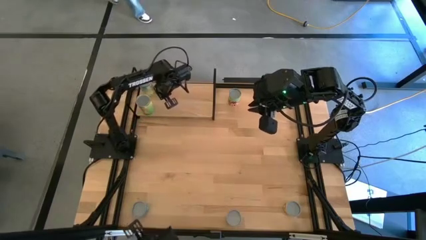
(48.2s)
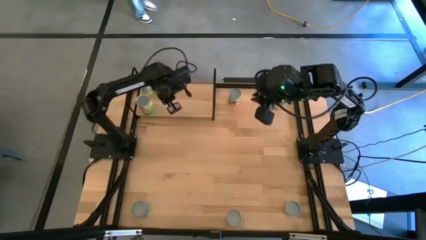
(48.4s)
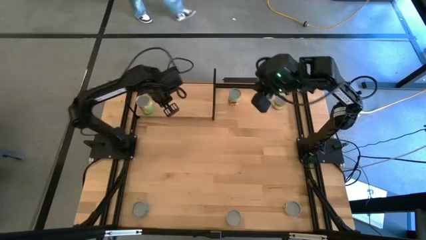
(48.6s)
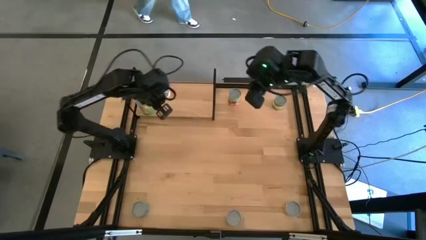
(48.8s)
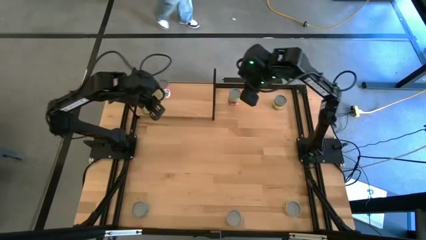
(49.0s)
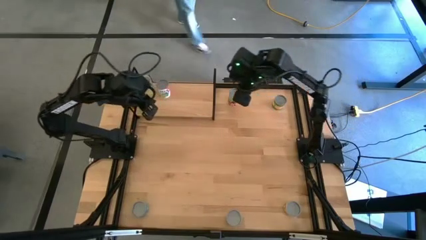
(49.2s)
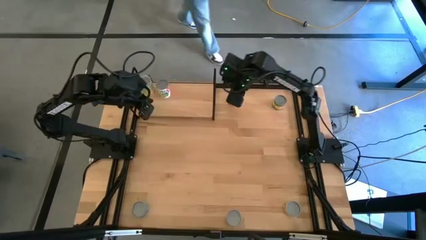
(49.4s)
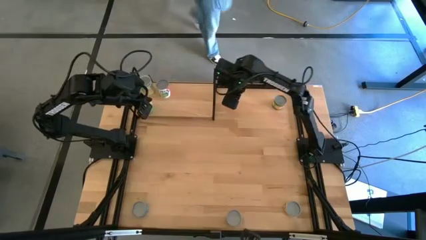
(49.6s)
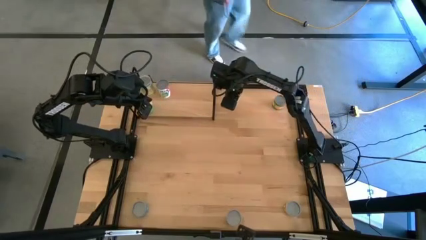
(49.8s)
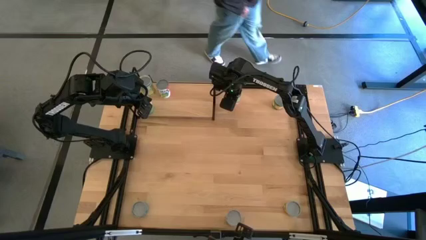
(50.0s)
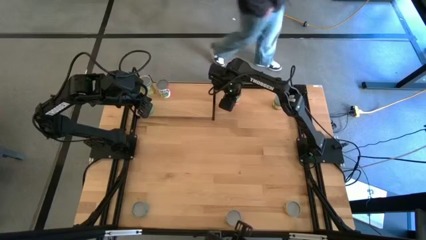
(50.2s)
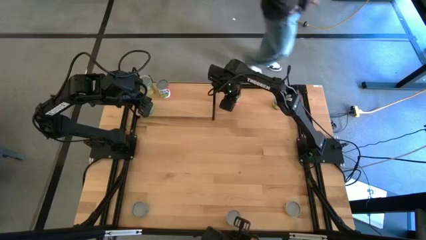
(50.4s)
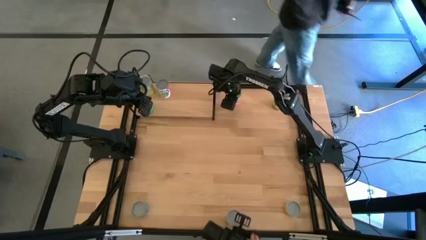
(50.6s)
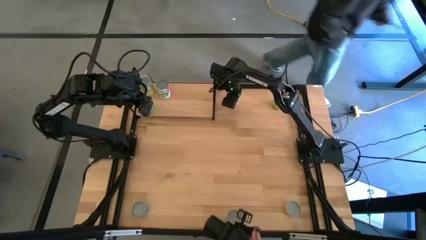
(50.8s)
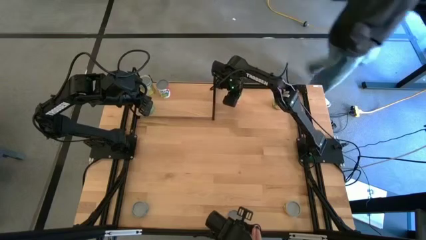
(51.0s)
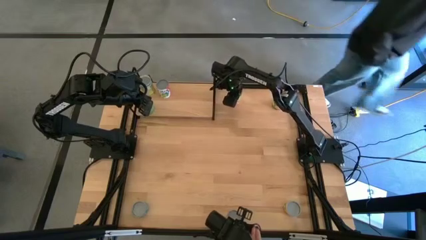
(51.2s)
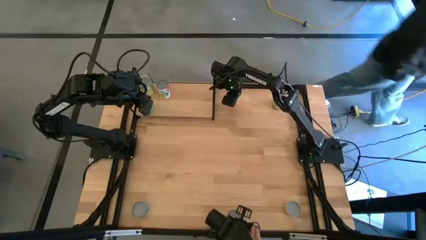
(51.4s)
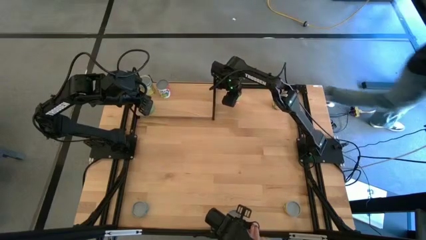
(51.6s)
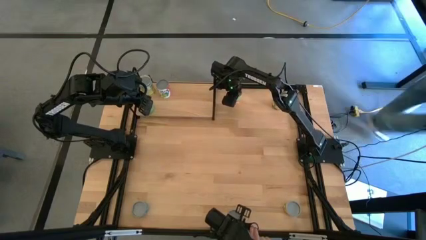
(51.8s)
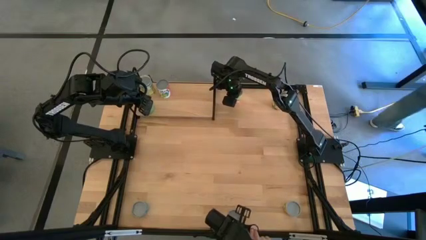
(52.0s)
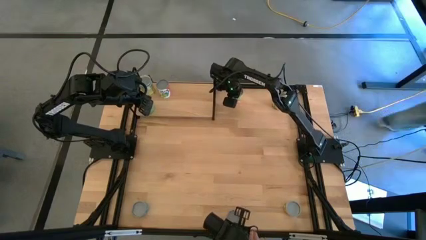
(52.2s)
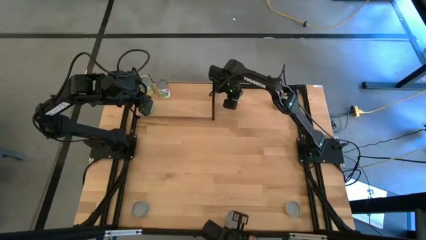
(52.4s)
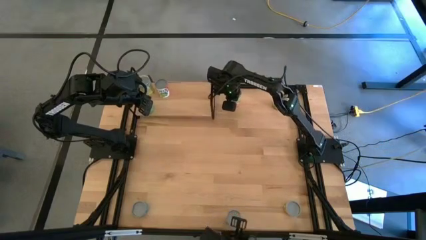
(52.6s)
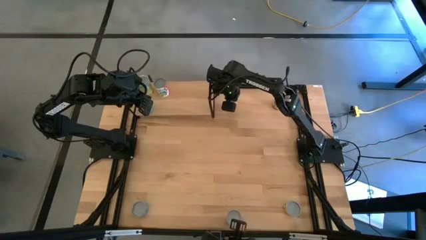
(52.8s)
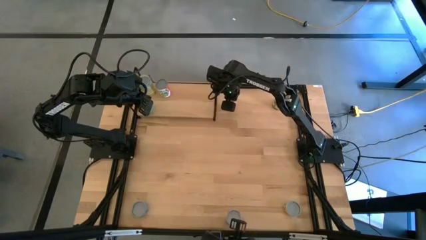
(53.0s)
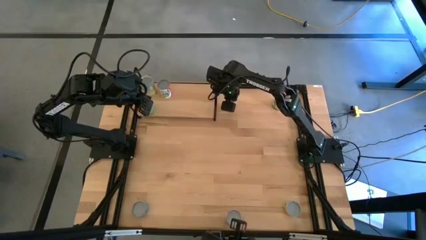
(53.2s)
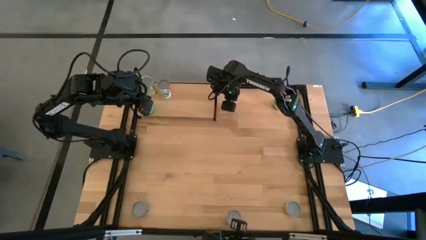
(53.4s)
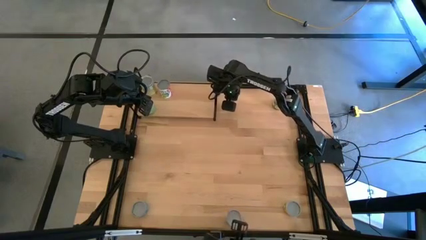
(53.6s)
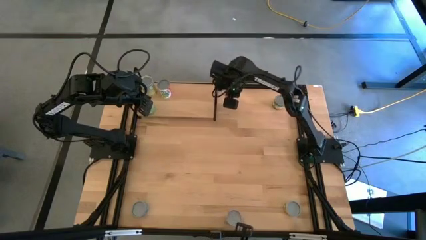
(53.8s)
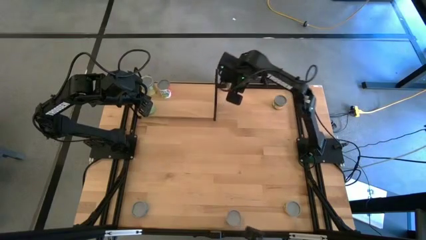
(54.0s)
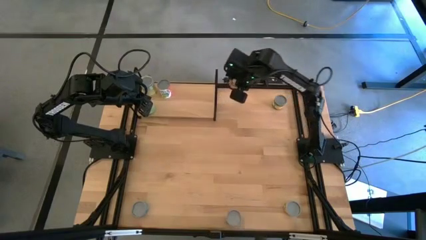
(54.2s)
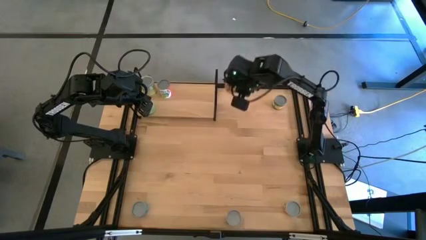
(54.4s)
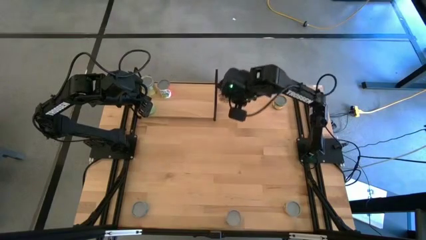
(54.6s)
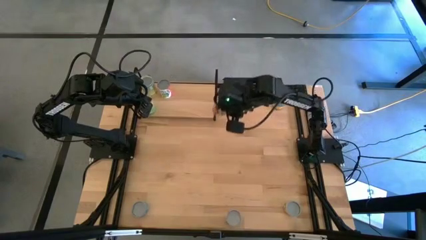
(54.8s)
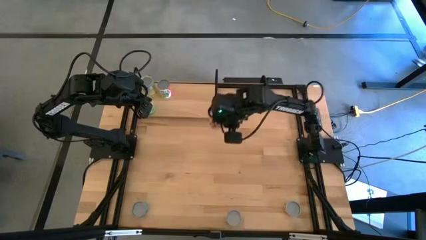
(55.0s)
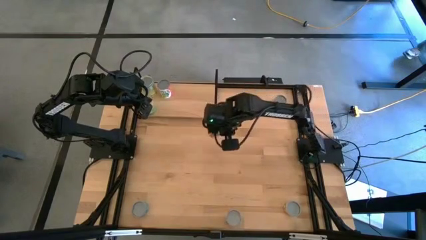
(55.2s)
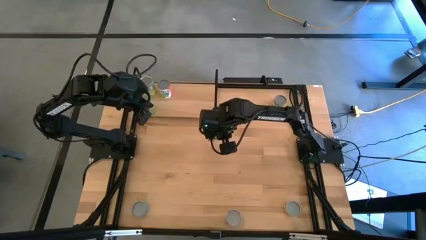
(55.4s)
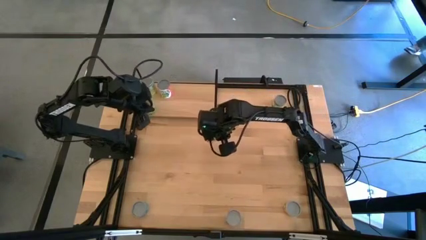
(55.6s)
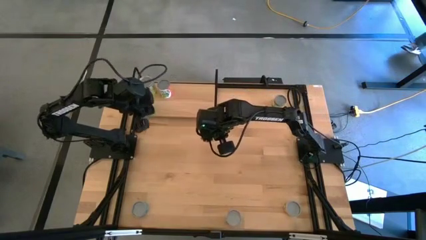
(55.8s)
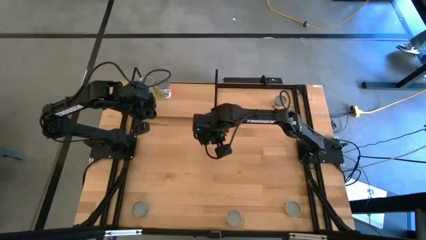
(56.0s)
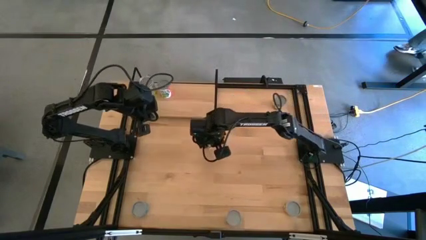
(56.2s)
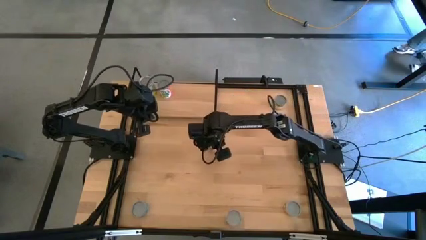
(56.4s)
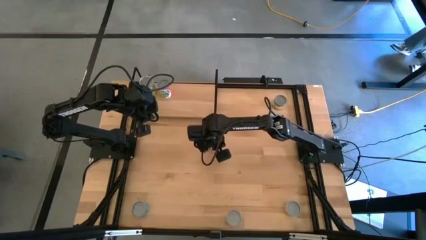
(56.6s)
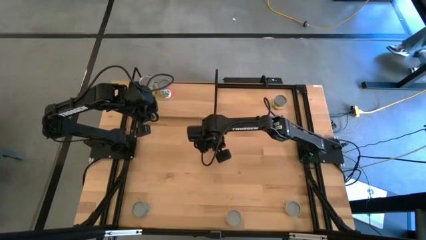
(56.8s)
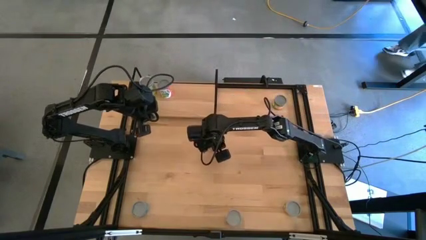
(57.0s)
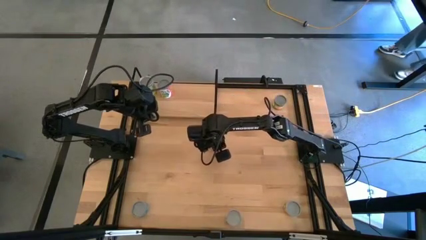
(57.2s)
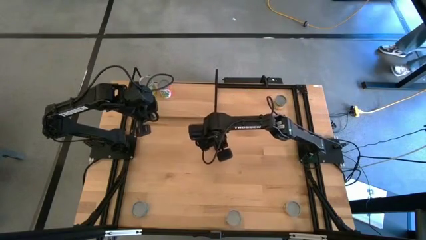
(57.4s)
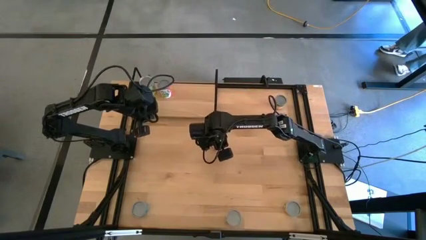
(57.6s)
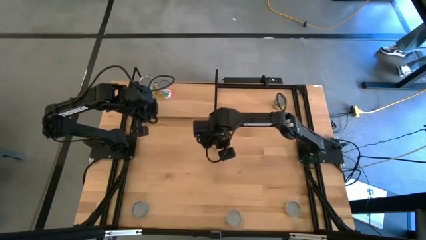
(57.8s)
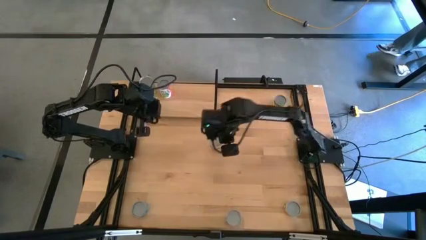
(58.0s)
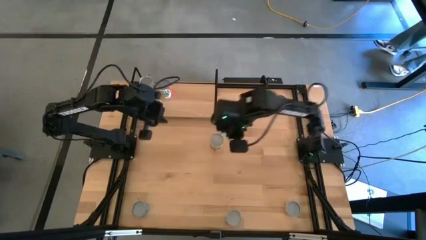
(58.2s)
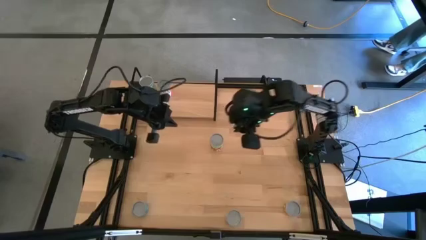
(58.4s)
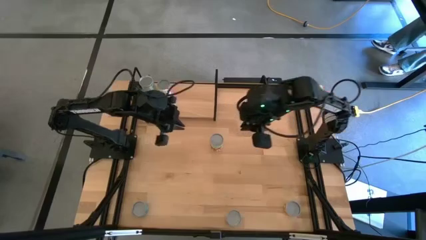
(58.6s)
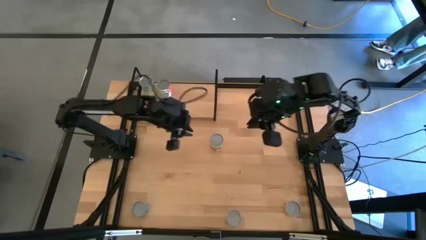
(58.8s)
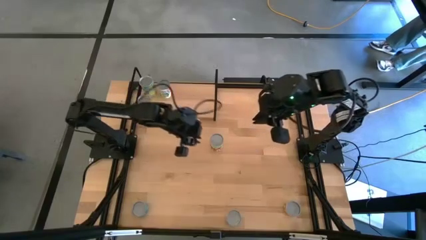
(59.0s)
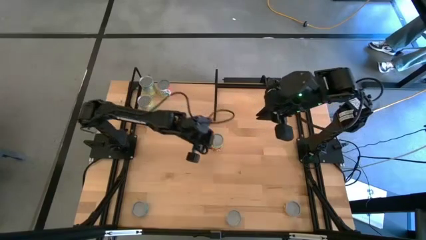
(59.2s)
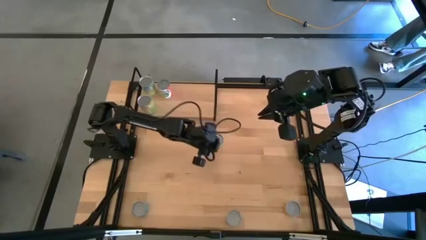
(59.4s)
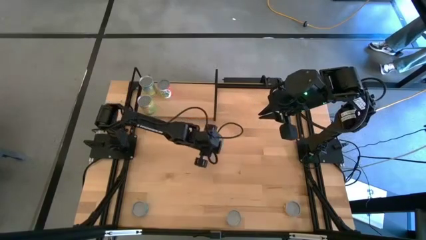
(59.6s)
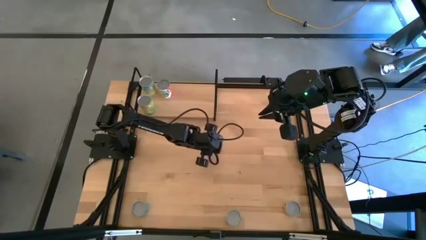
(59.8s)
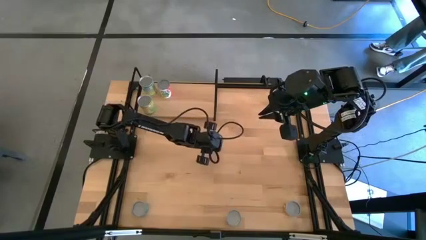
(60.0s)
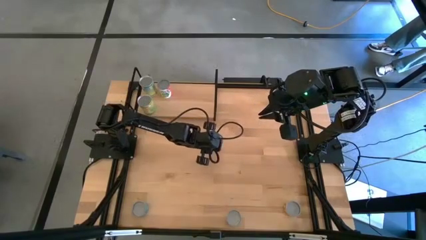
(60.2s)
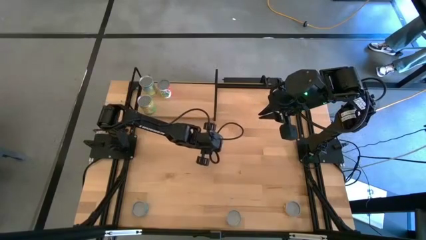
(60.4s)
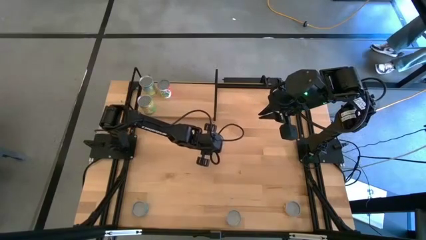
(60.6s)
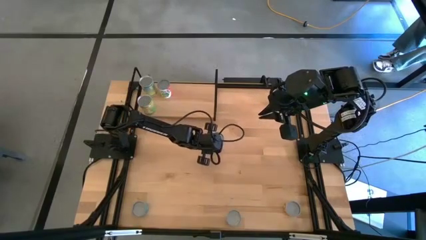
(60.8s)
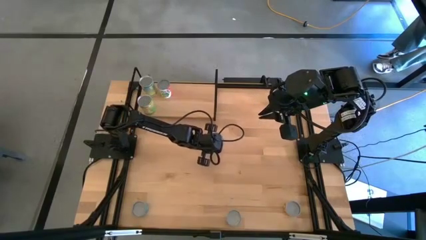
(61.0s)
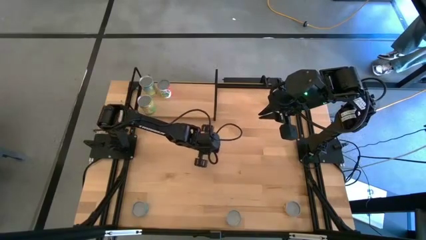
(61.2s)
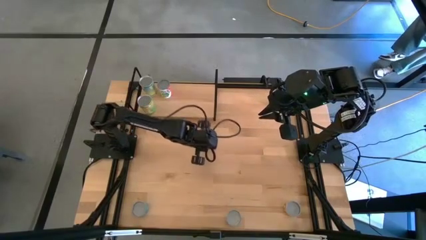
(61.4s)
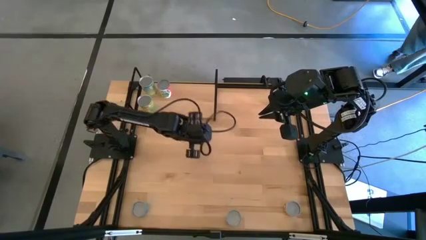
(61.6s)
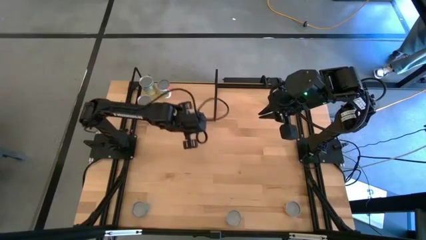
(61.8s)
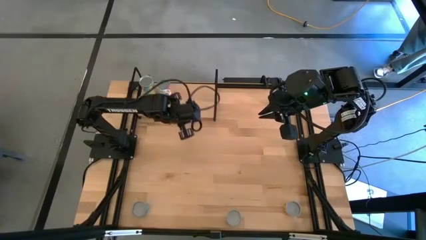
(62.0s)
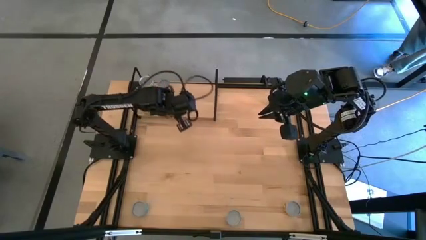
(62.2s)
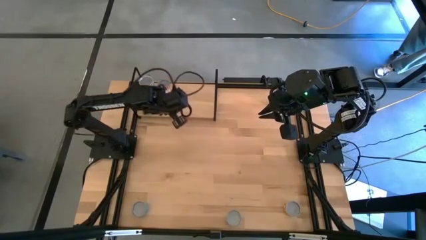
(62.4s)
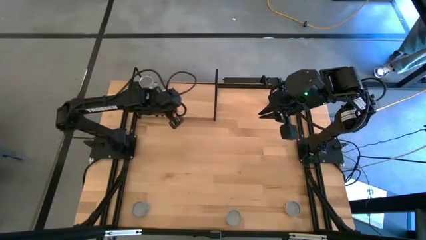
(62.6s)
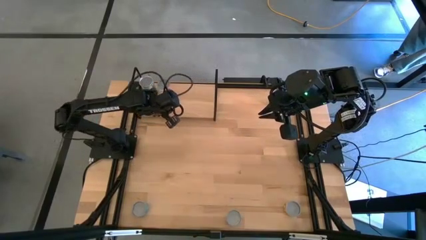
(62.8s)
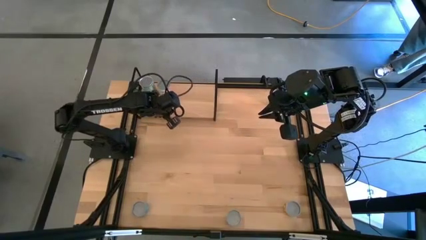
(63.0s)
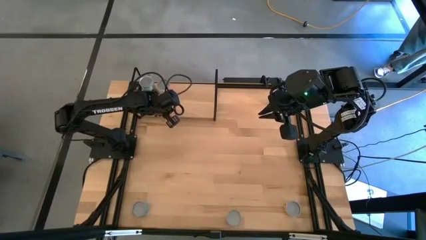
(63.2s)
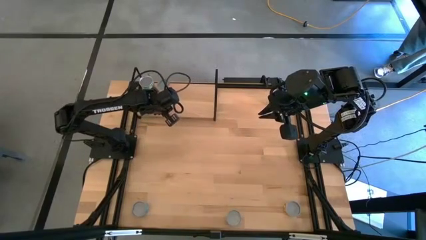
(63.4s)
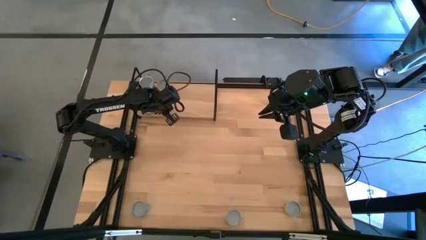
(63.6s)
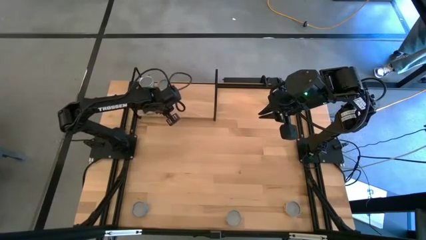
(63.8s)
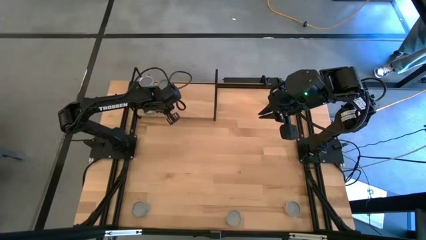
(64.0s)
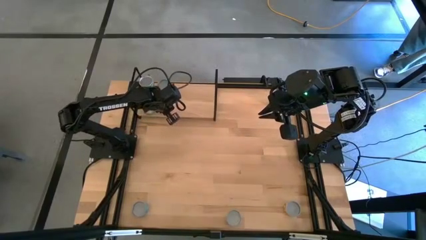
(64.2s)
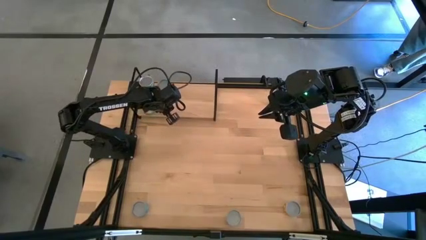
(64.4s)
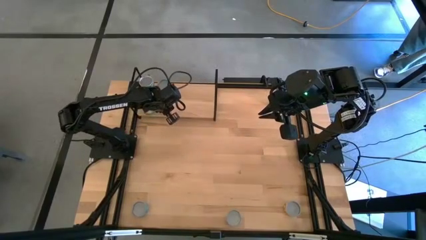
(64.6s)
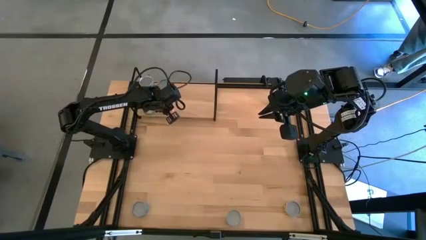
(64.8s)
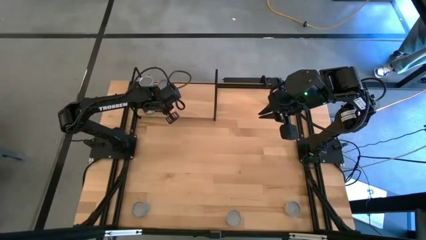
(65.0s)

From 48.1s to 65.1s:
Task: Pick and place cans onto a shelf
Put the canned spaghetti on the shelf
